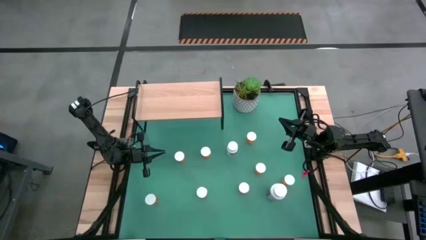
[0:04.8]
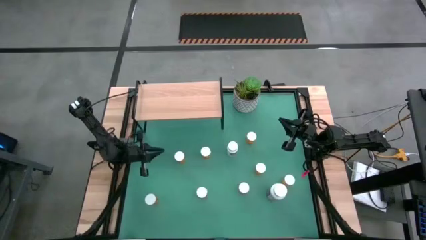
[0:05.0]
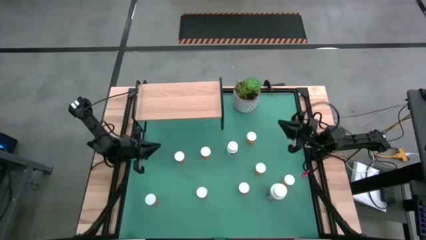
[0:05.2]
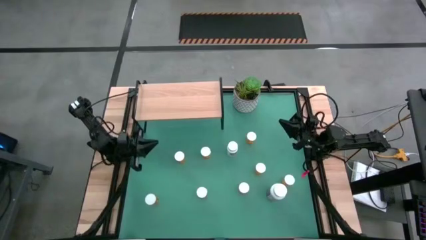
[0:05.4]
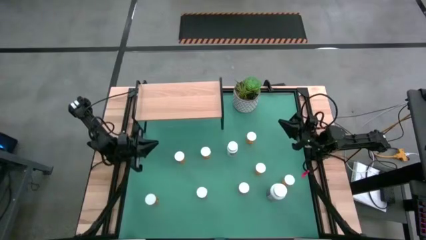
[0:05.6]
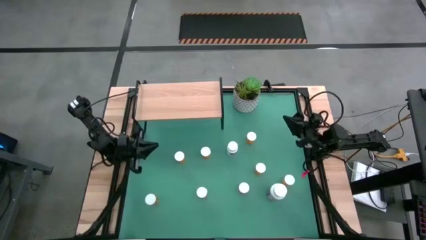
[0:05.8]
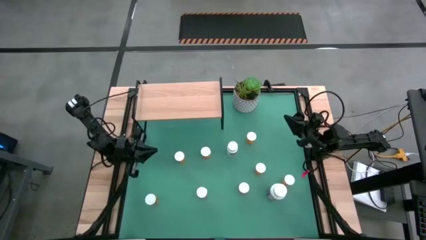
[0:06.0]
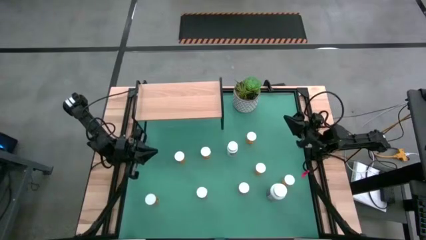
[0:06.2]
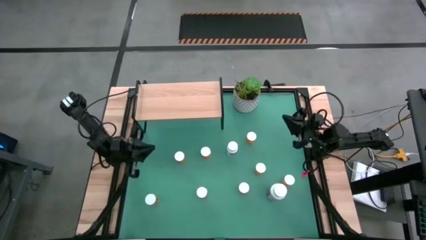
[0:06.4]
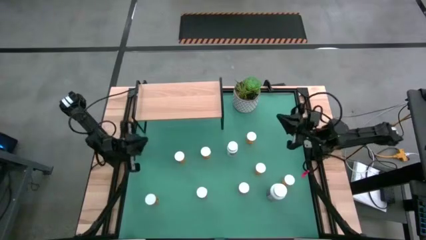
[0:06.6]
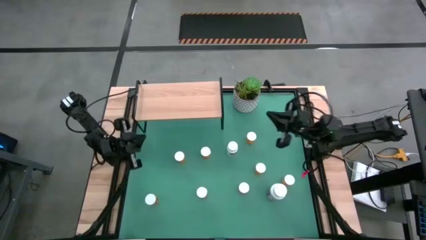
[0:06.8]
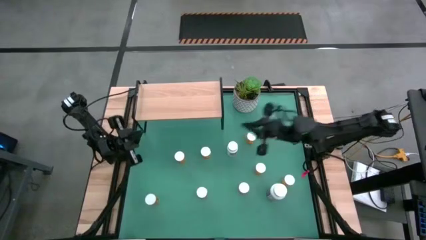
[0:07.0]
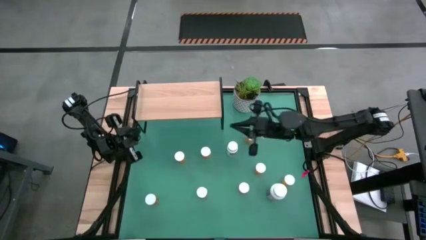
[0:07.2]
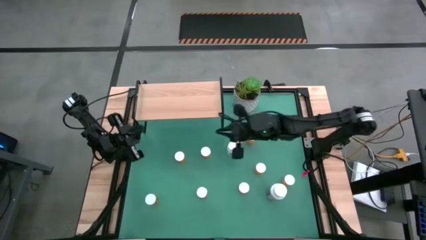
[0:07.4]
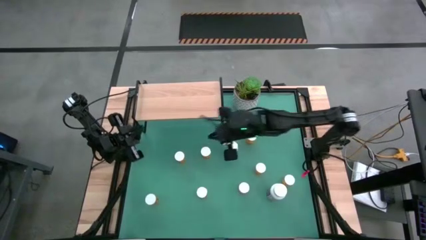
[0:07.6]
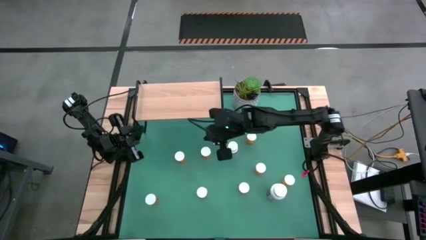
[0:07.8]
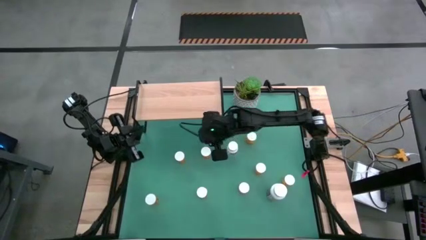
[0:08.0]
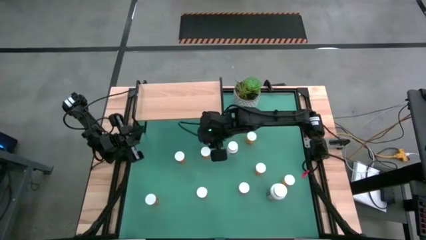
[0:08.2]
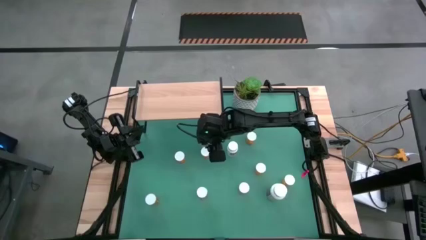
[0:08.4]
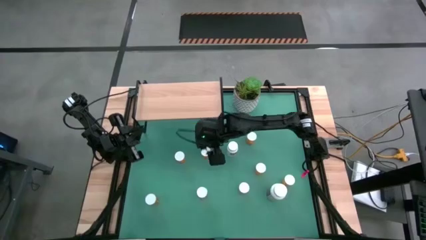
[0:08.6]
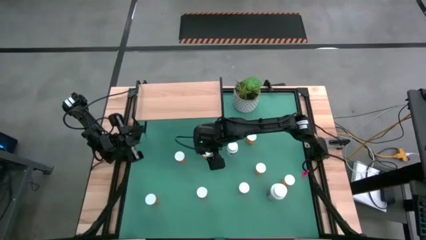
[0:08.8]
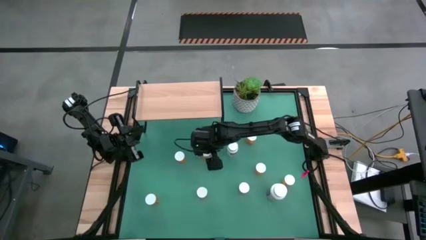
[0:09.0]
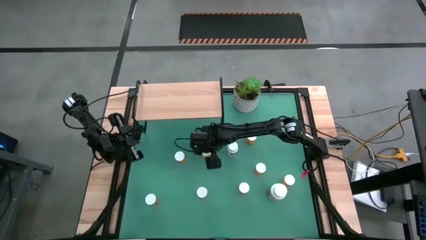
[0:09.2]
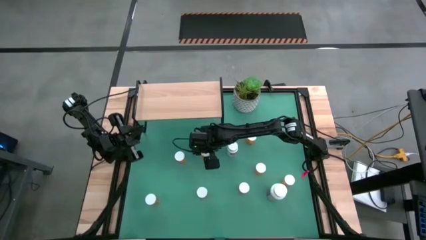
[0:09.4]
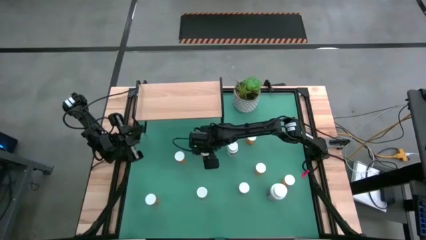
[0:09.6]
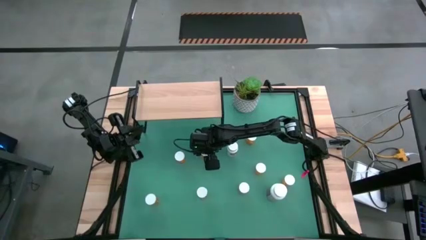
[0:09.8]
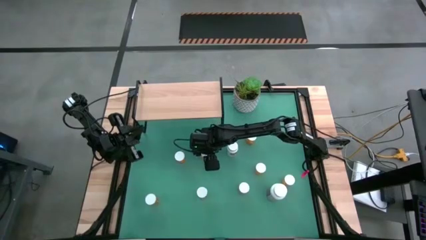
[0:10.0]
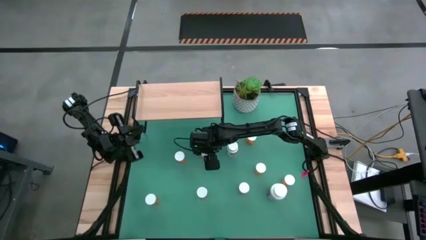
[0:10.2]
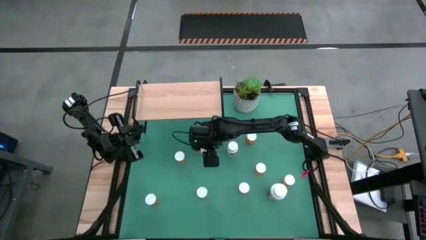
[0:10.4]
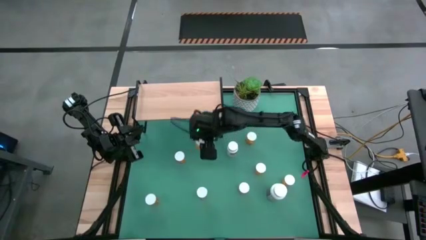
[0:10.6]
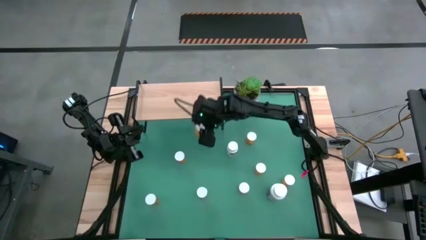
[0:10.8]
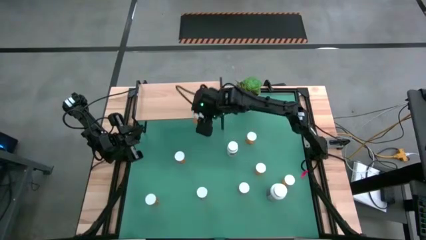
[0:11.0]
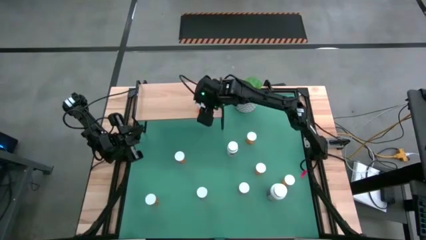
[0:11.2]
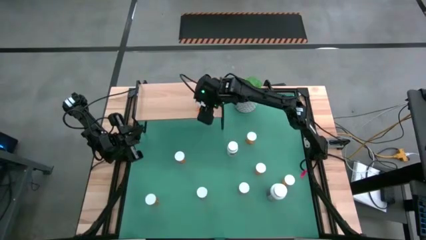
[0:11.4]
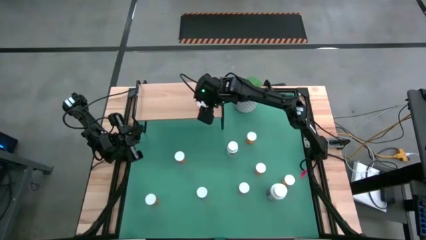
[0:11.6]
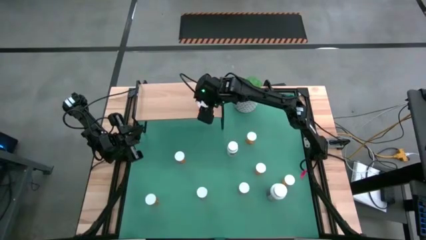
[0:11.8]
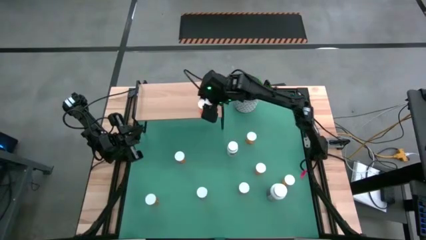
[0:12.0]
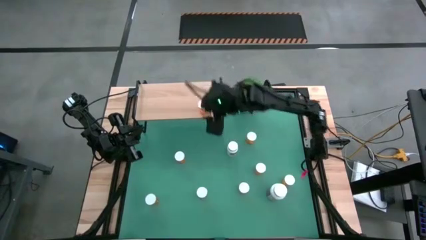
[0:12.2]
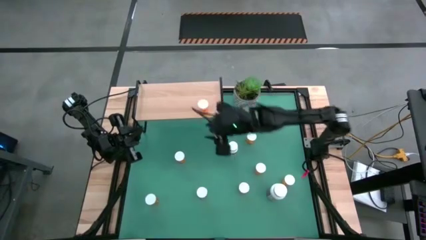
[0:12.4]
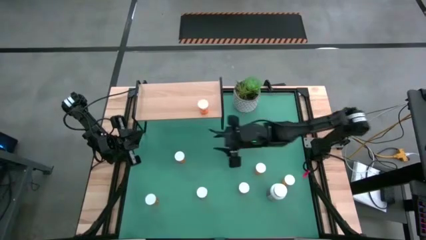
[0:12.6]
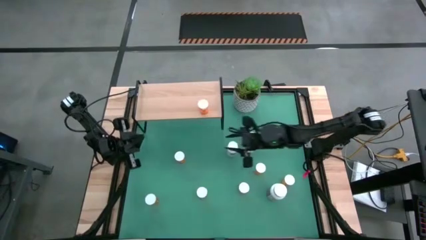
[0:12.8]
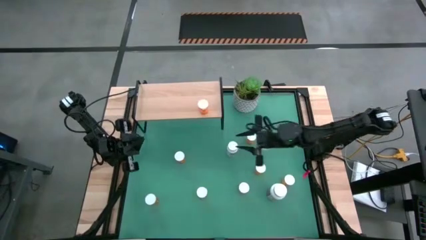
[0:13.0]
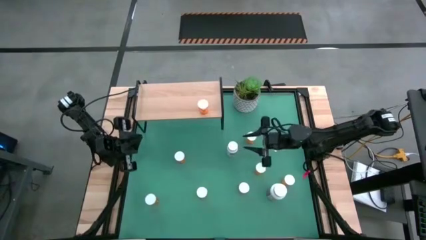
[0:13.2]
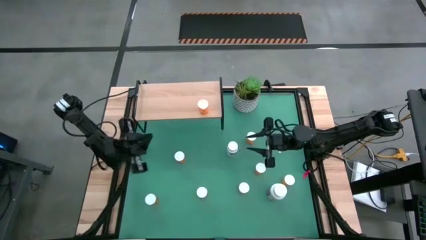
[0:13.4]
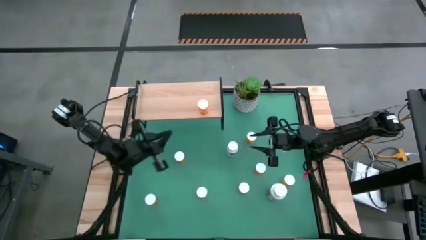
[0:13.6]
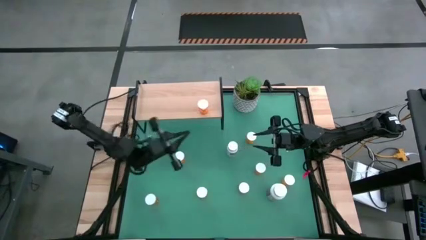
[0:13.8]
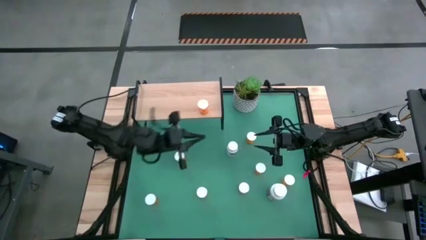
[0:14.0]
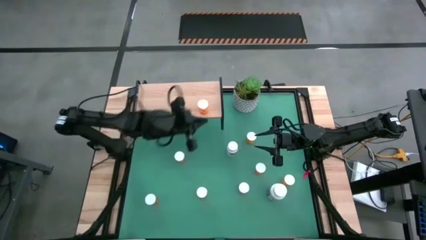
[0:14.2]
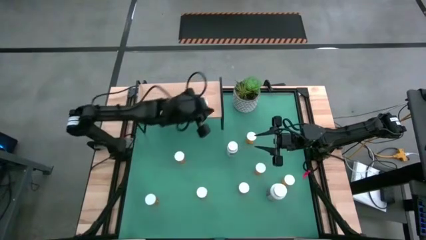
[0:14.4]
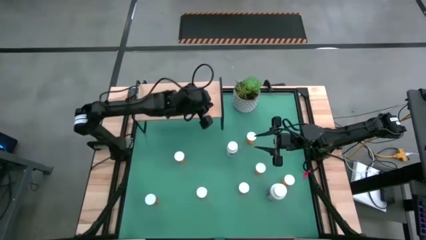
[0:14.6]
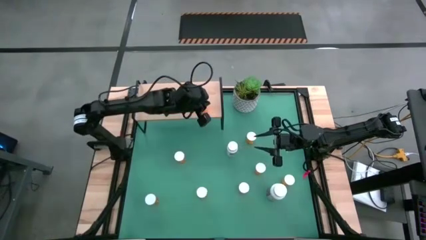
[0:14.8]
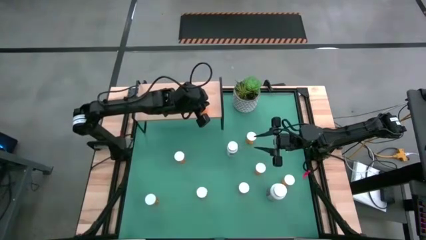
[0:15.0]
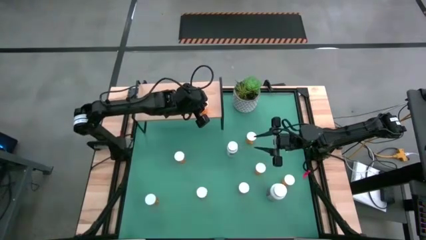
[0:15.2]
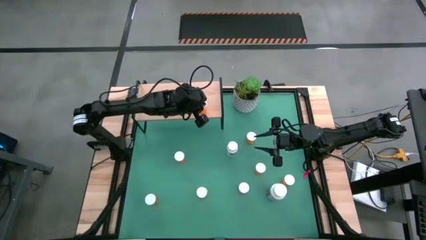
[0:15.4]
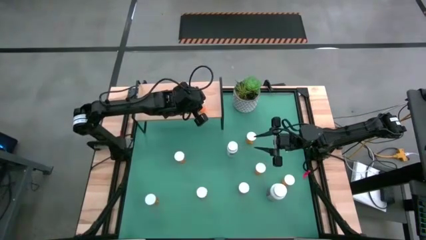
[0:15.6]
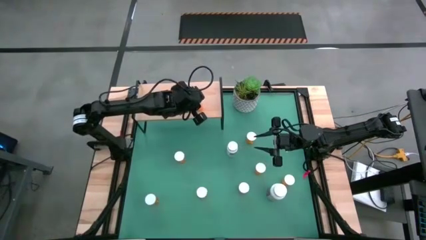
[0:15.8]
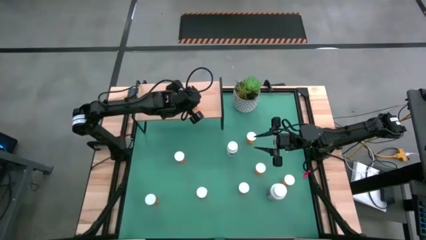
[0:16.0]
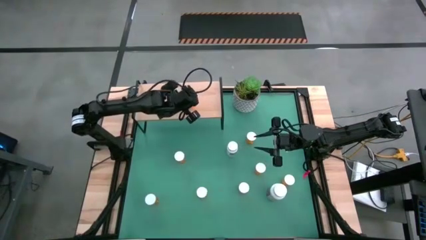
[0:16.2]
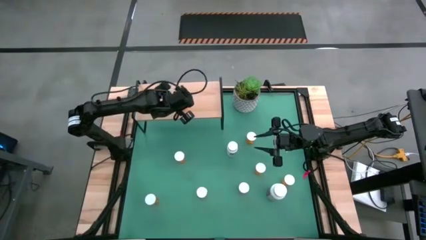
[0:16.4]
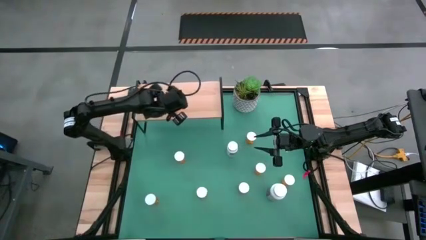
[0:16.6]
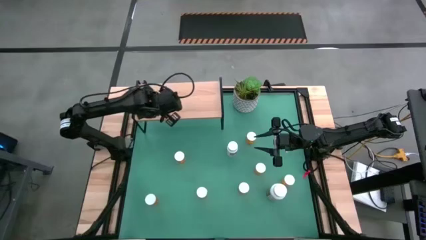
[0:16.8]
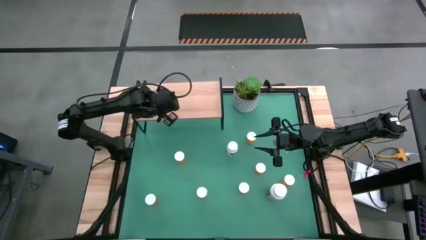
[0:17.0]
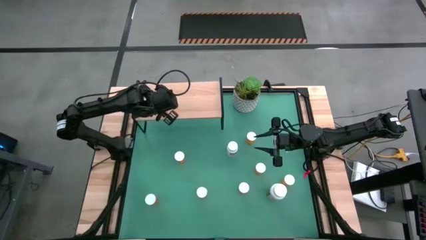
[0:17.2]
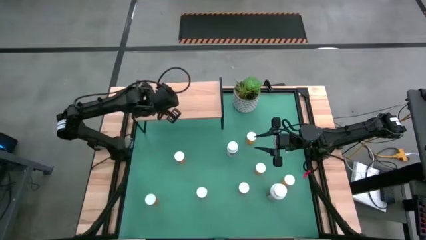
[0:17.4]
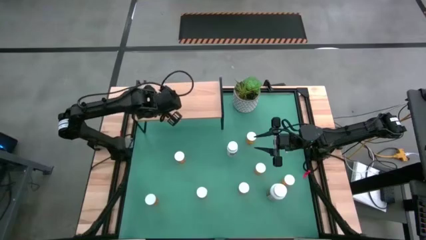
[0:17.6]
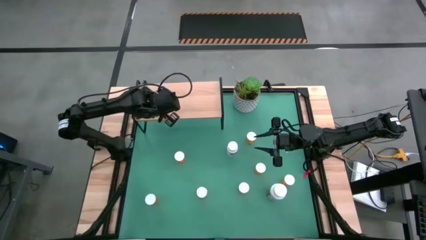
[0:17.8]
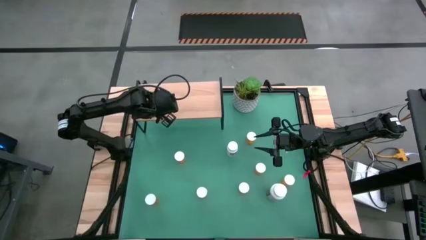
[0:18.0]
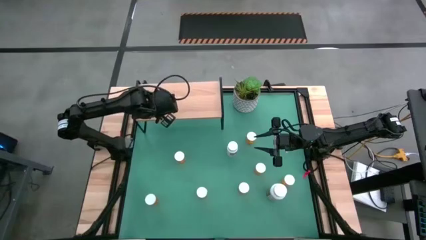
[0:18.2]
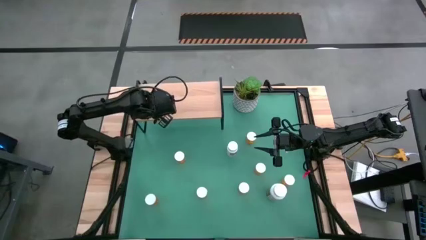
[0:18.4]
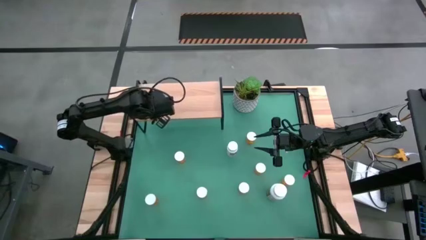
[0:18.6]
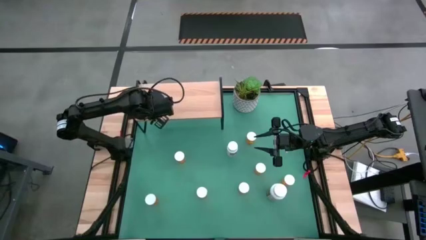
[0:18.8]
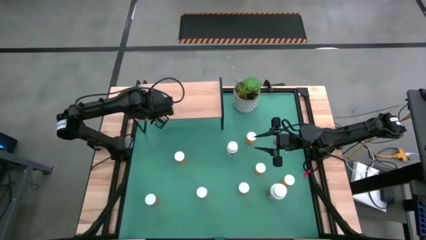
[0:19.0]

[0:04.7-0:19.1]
Task: Pick and place medicine bottles onto shelf by color
Put the orange pill bottle on the shelf
